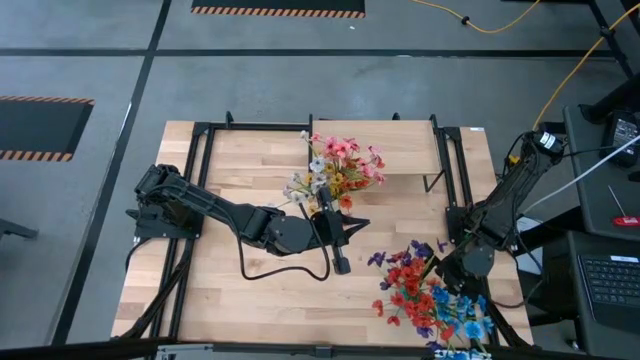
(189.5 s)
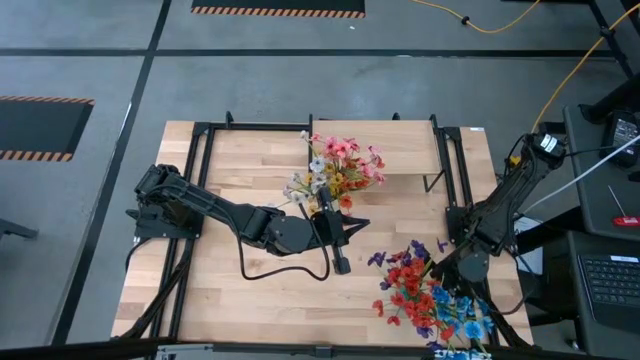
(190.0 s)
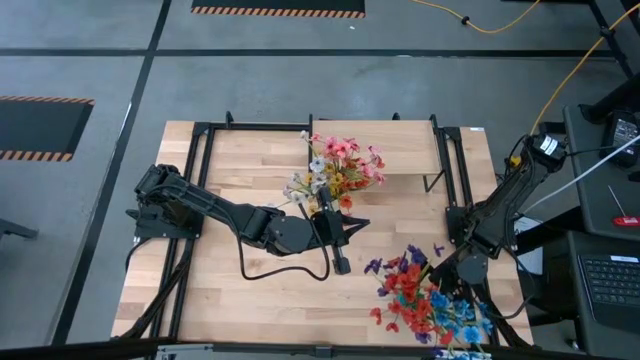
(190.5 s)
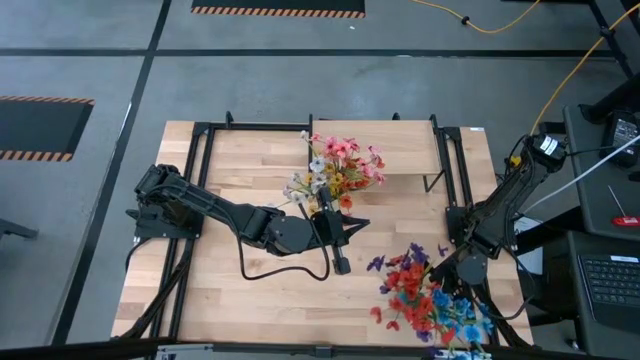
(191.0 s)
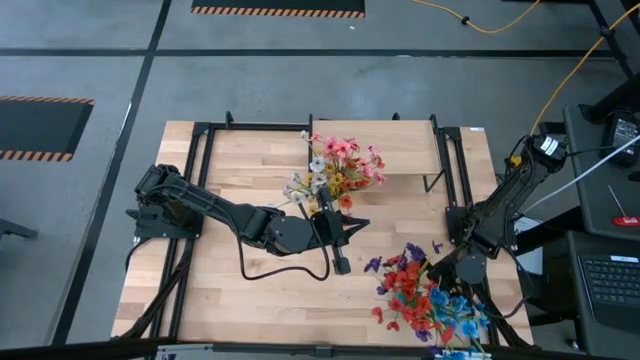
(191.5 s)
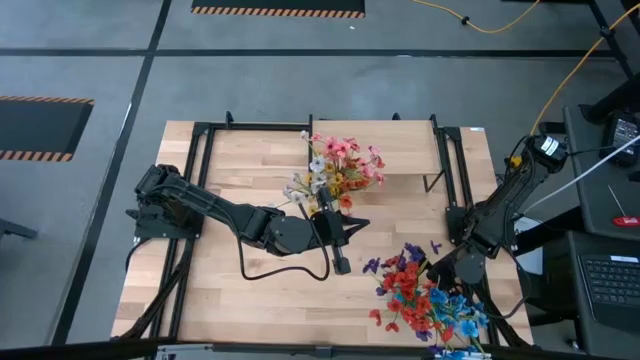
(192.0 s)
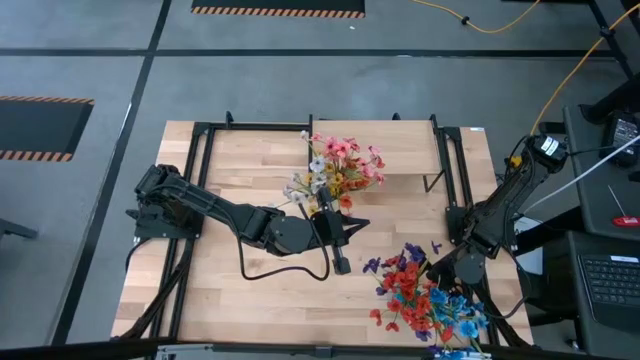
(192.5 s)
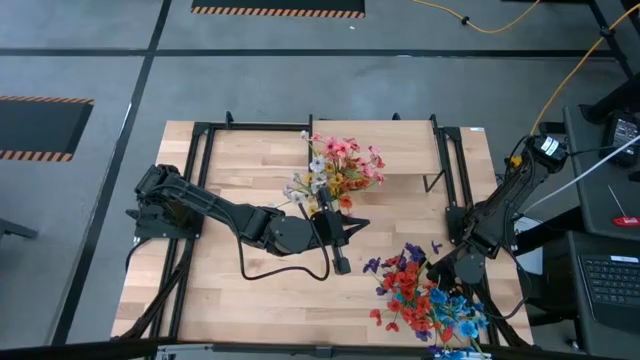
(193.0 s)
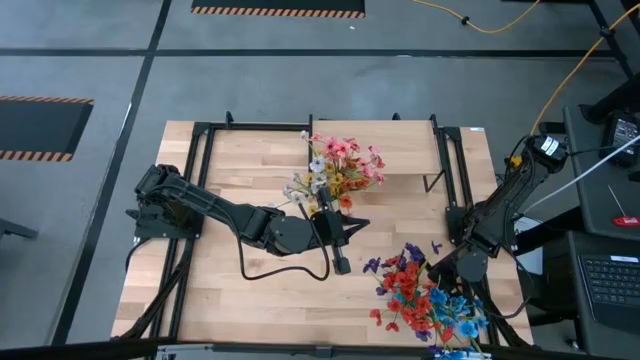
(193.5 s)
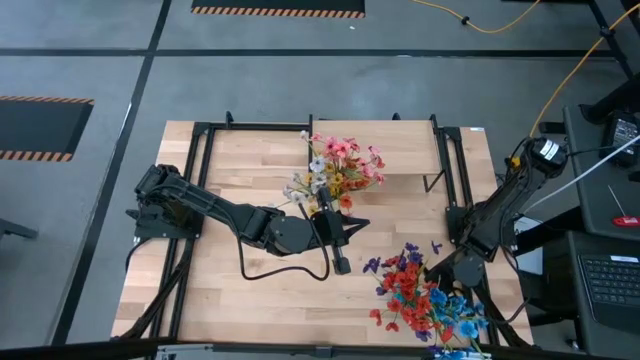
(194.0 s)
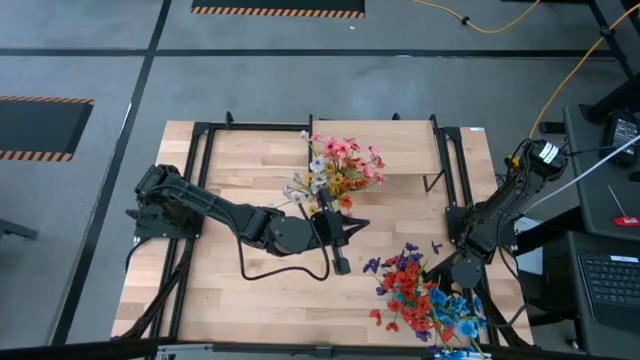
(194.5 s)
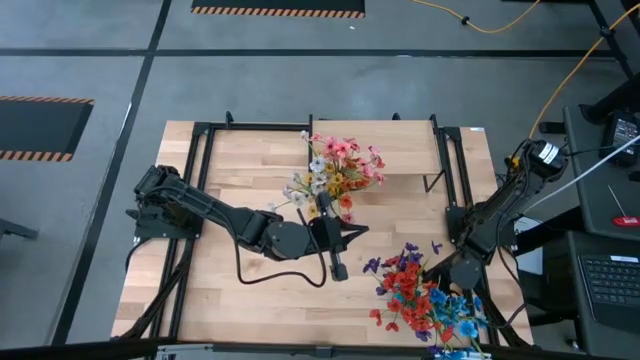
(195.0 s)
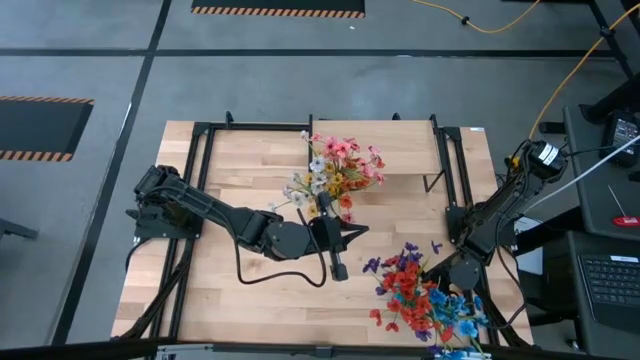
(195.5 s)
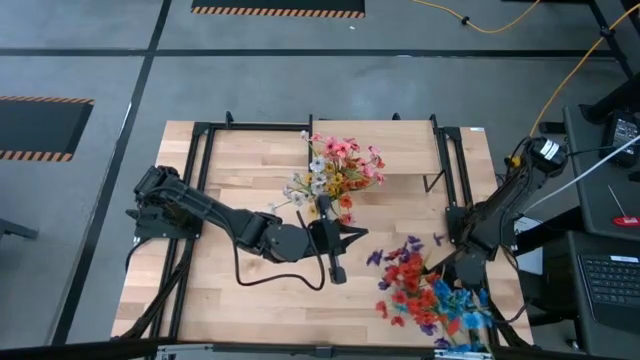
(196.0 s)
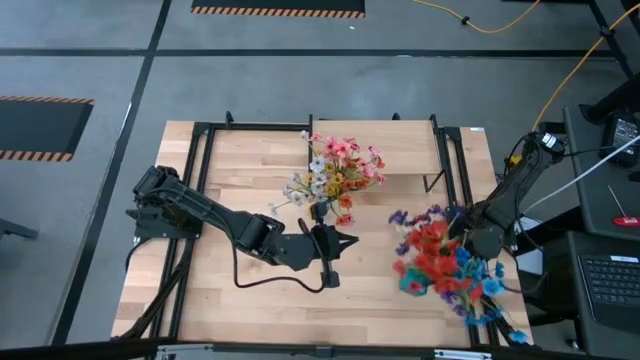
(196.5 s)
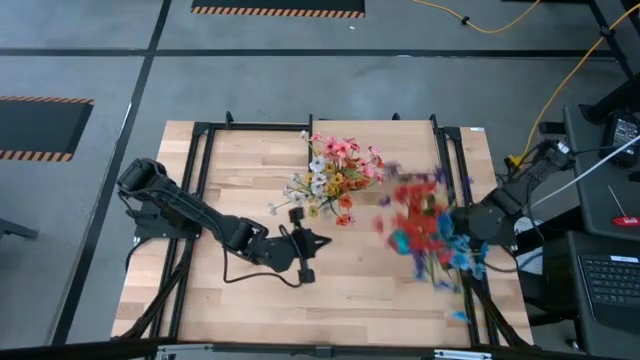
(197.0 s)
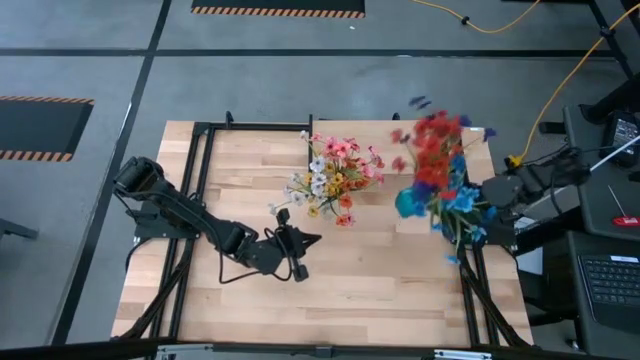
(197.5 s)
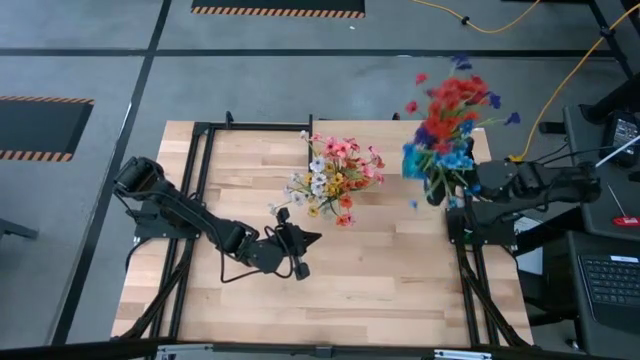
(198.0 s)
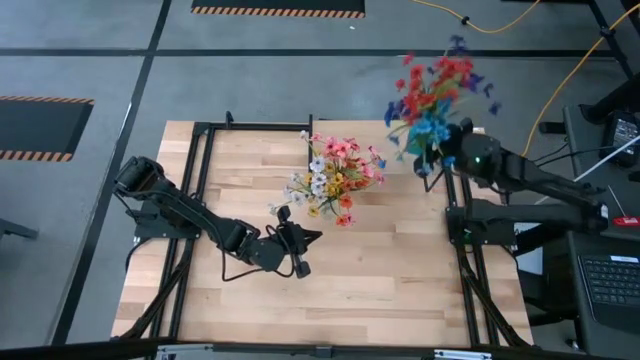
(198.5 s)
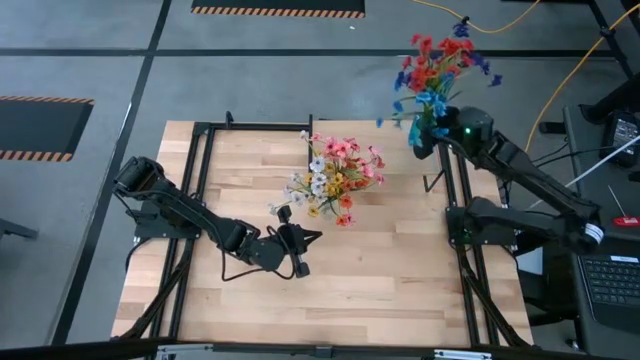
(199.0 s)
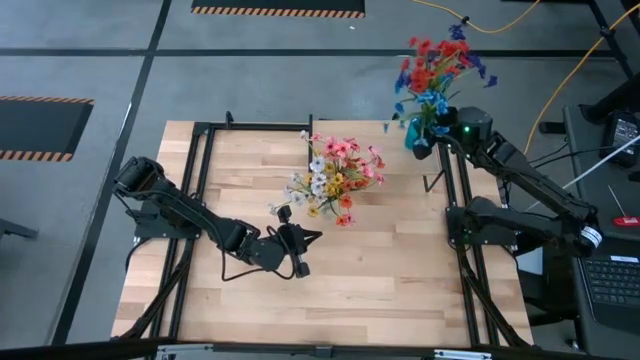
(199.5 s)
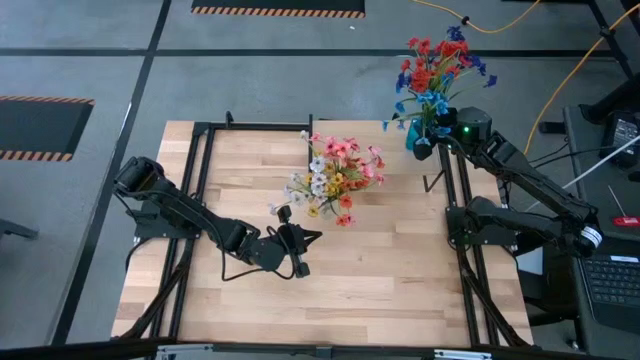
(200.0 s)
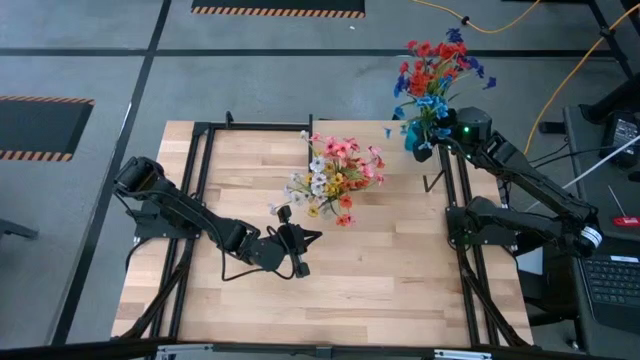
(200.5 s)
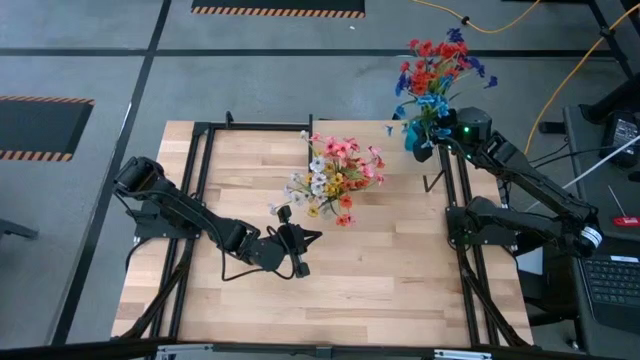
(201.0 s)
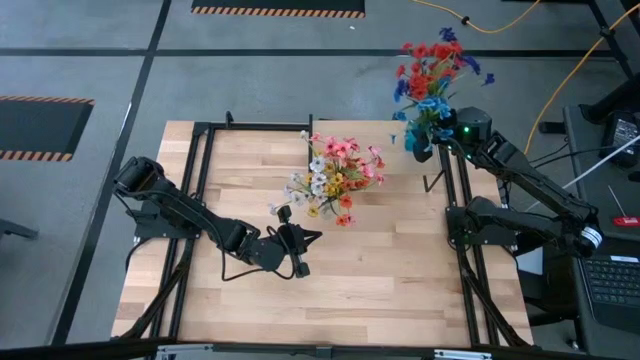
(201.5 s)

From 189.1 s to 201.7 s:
Task: Pick and place flowers into a vace then onto a shelf
Put the blue vase on the shelf

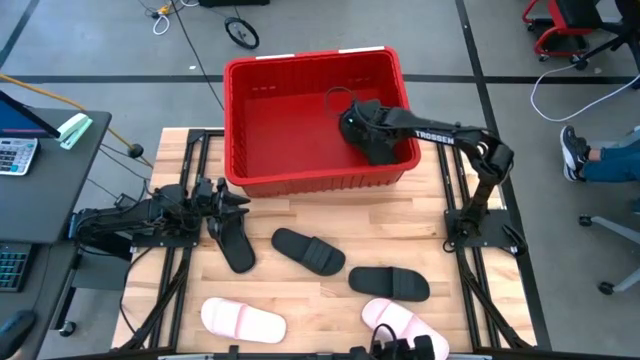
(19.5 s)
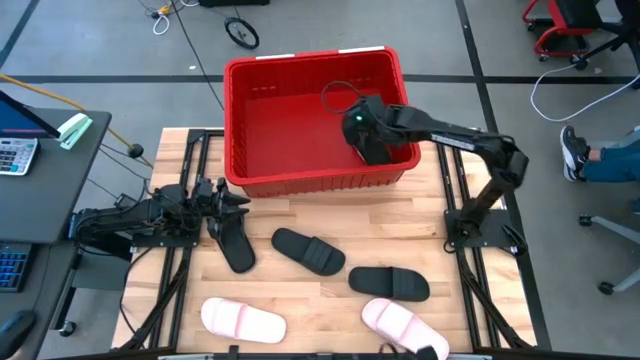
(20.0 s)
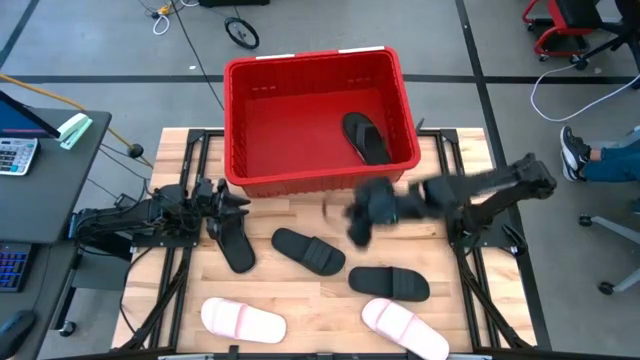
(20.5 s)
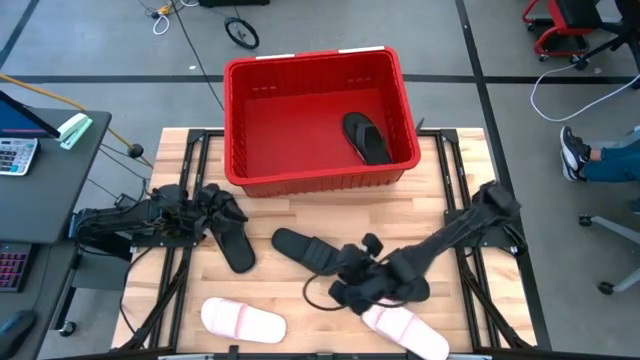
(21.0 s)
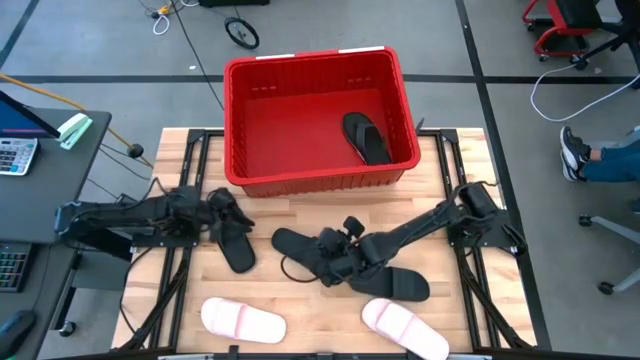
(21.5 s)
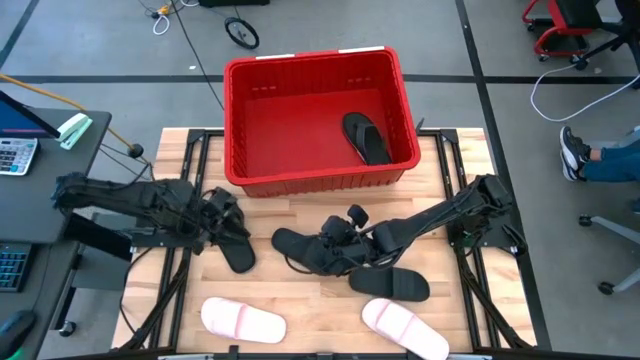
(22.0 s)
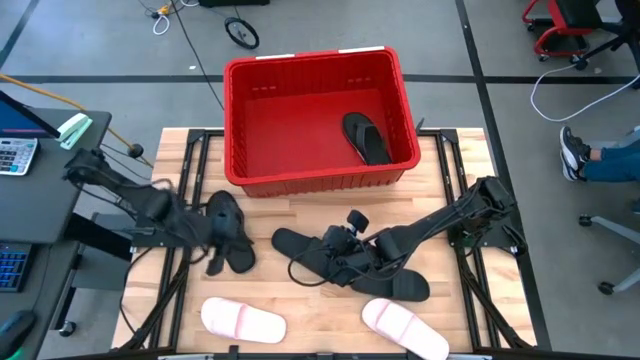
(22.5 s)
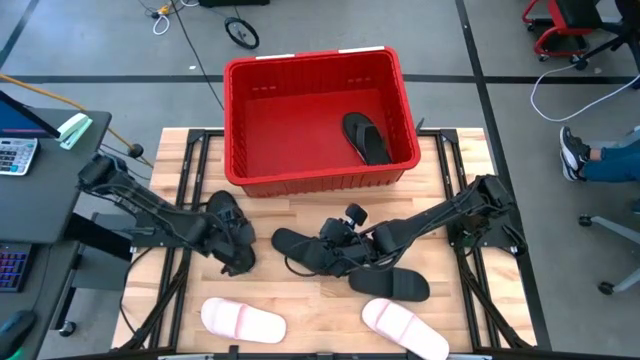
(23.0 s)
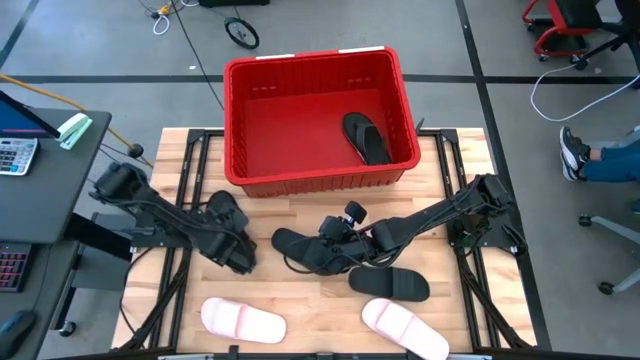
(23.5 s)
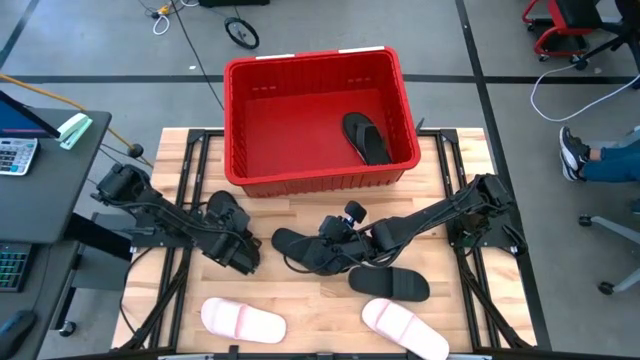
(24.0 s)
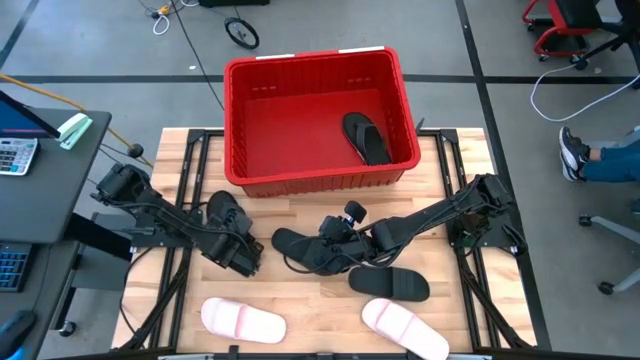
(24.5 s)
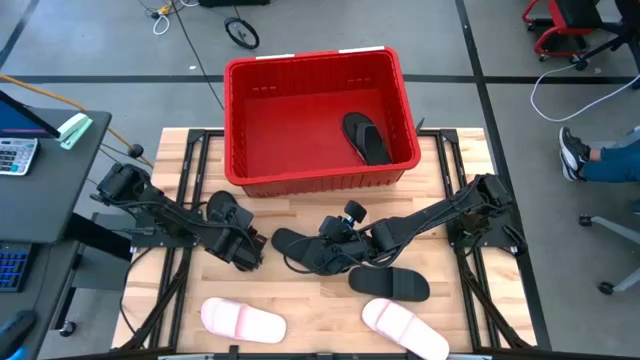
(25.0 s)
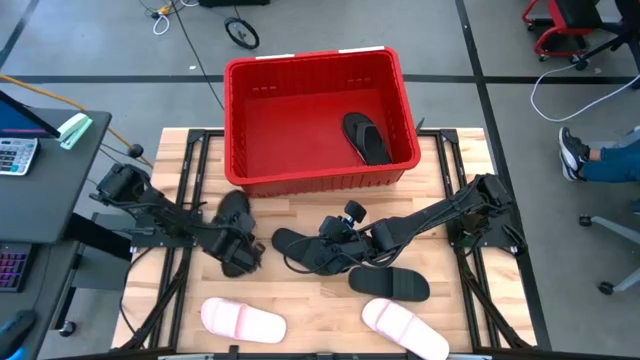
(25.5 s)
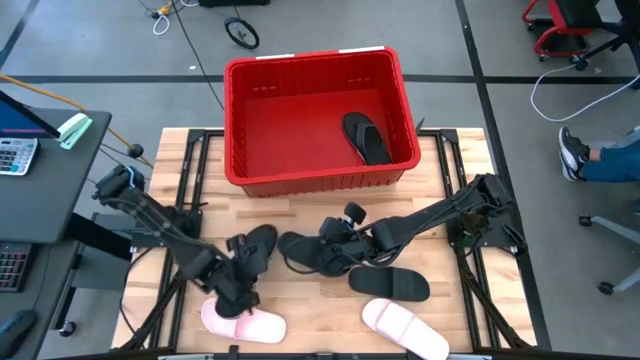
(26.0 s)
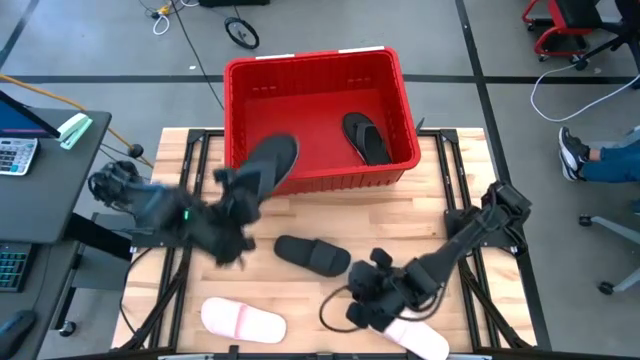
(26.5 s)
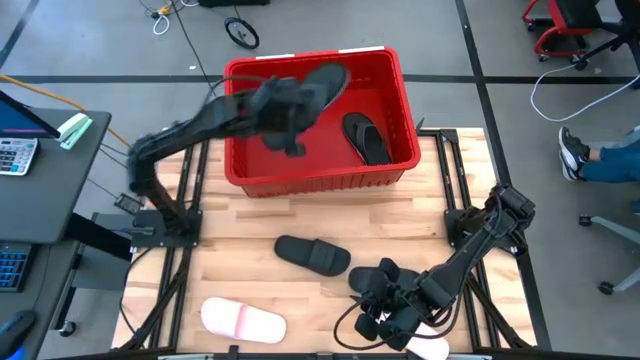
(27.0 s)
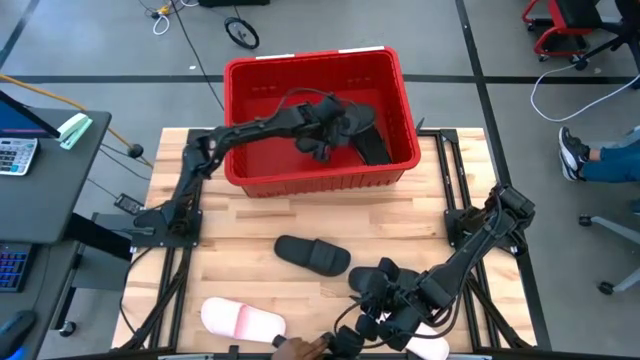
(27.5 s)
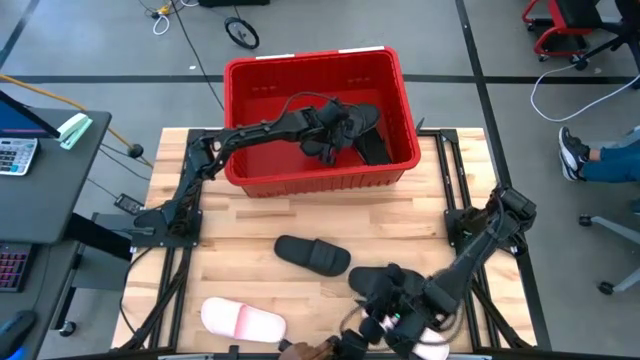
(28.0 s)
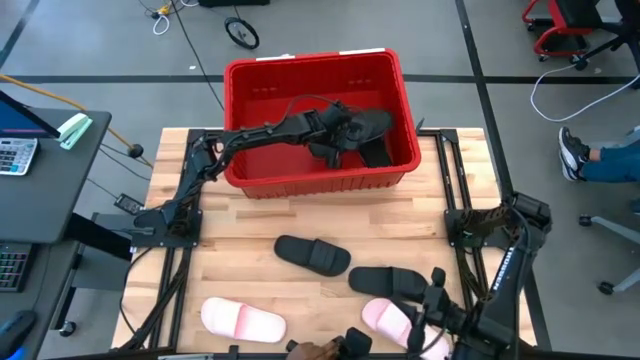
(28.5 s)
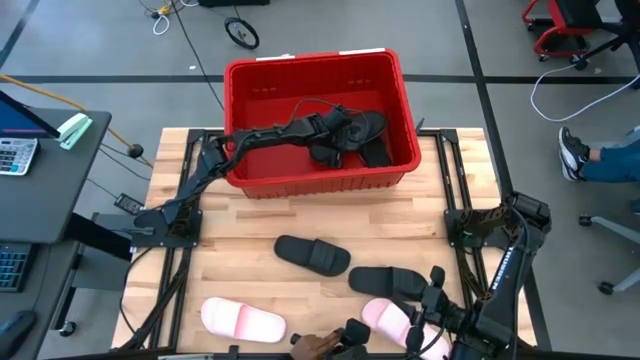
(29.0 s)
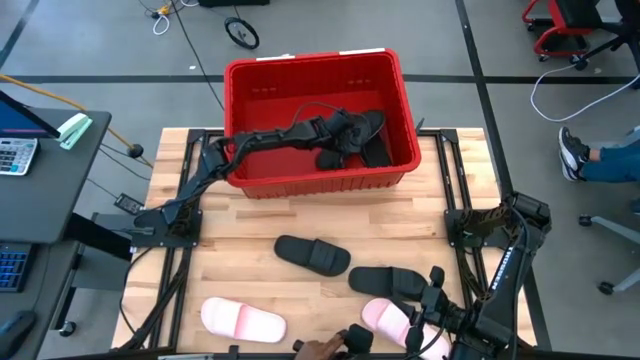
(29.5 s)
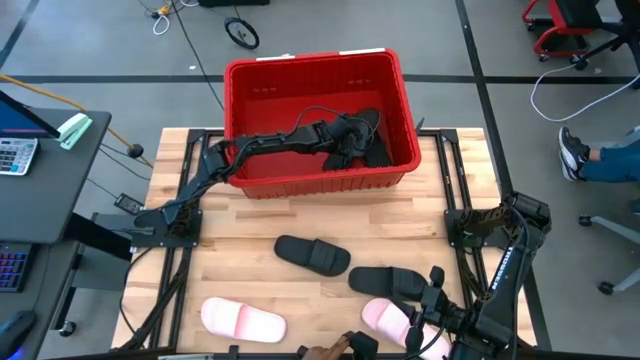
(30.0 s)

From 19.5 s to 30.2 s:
Task: Pick and place slides into bin
Put the black slipper into the red container
